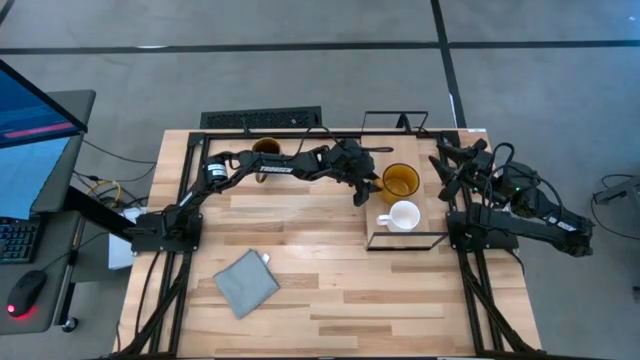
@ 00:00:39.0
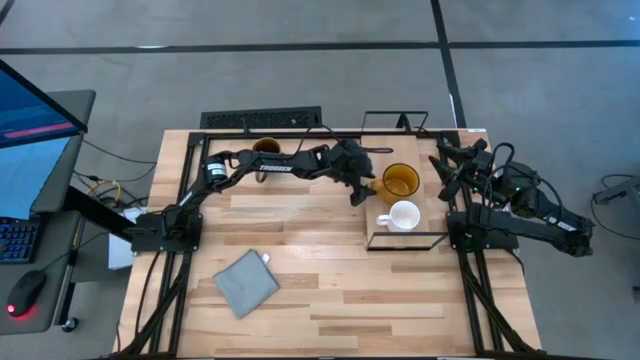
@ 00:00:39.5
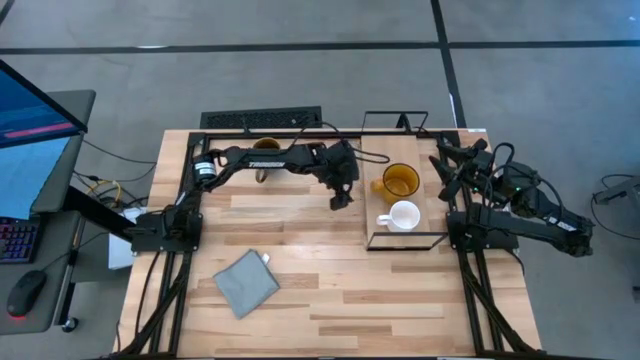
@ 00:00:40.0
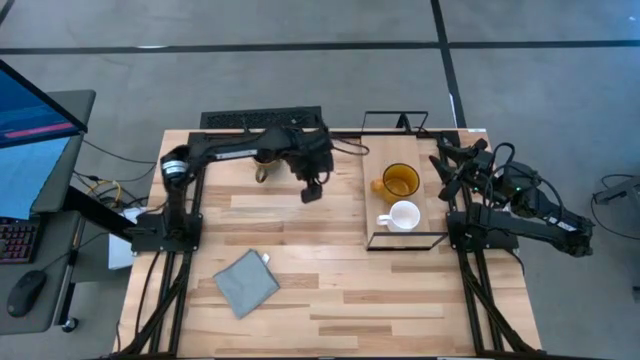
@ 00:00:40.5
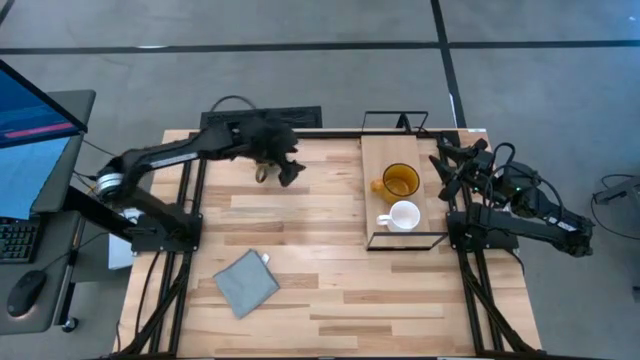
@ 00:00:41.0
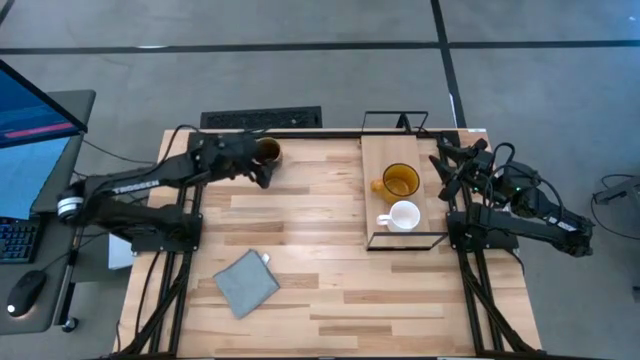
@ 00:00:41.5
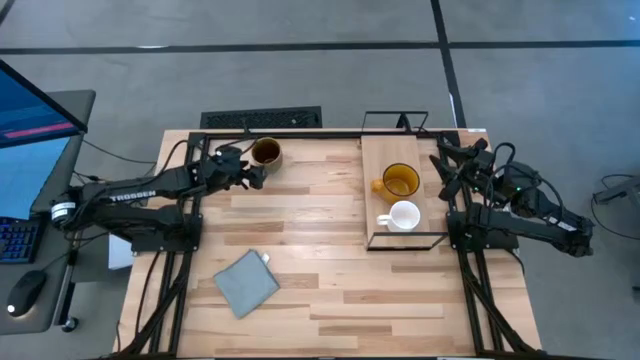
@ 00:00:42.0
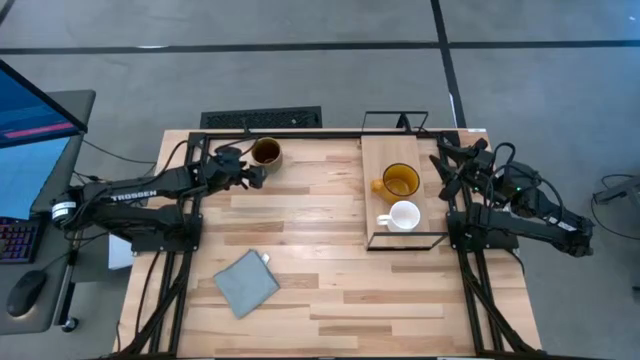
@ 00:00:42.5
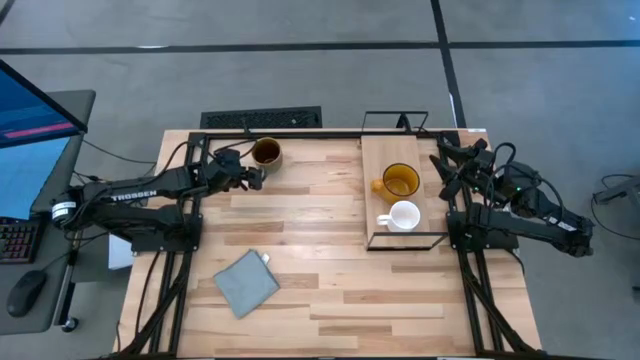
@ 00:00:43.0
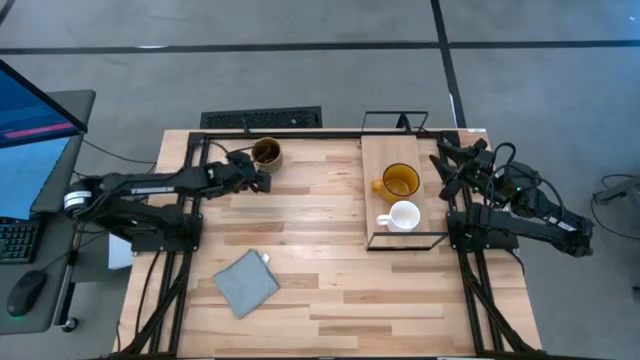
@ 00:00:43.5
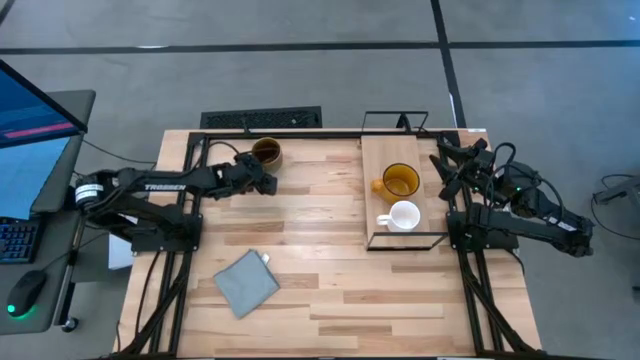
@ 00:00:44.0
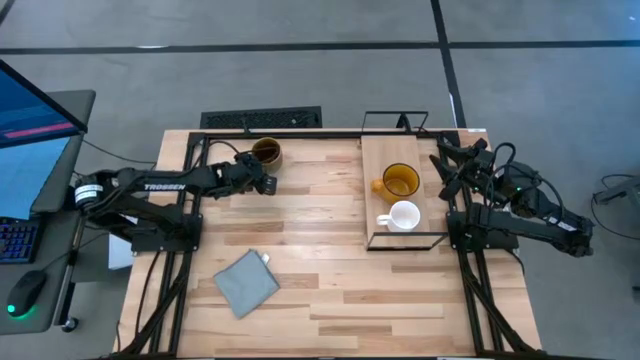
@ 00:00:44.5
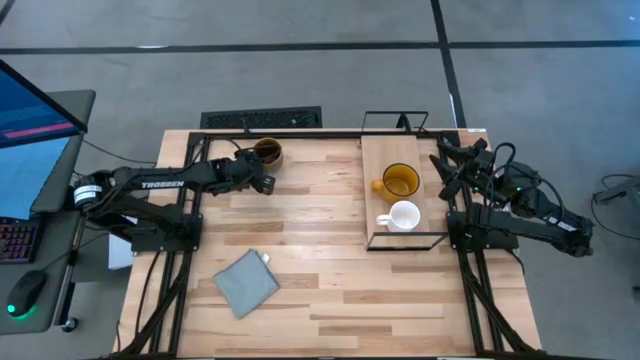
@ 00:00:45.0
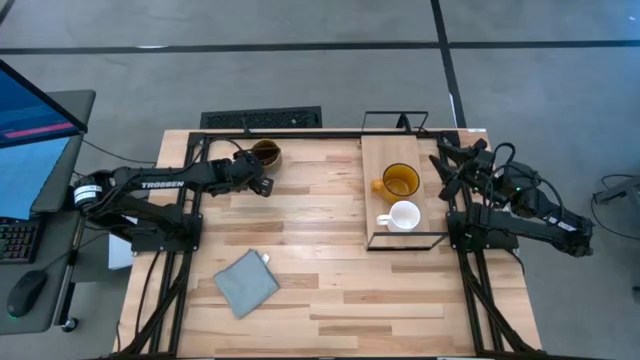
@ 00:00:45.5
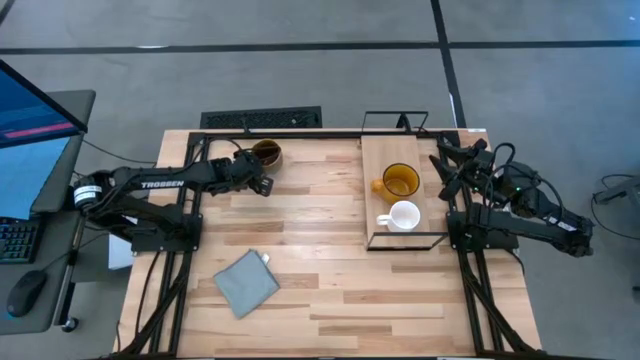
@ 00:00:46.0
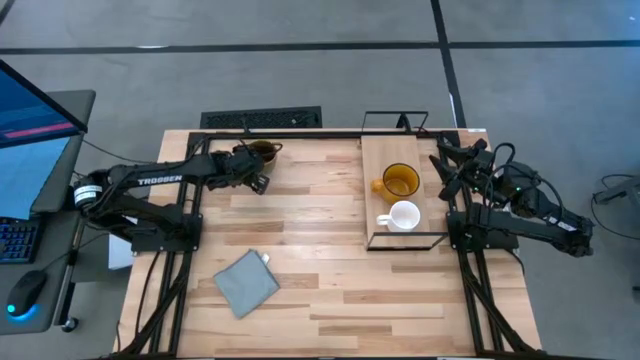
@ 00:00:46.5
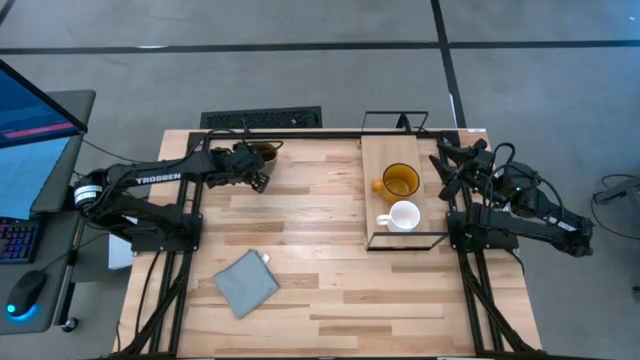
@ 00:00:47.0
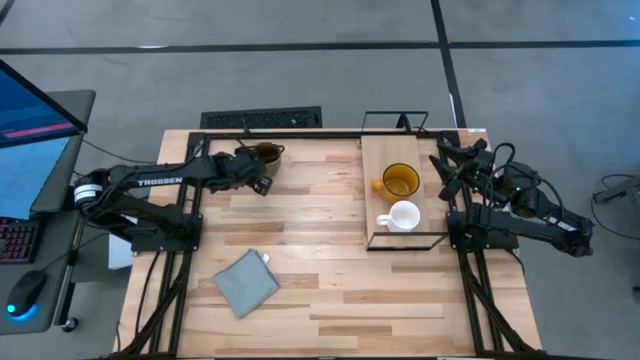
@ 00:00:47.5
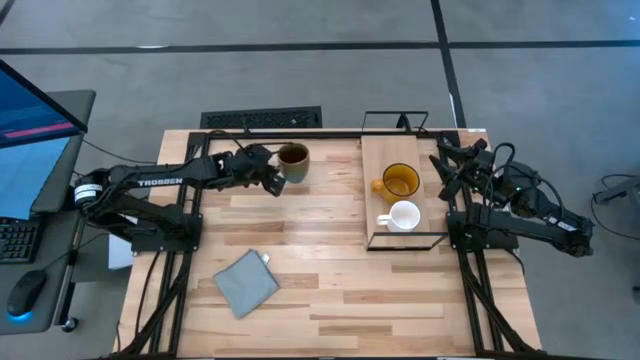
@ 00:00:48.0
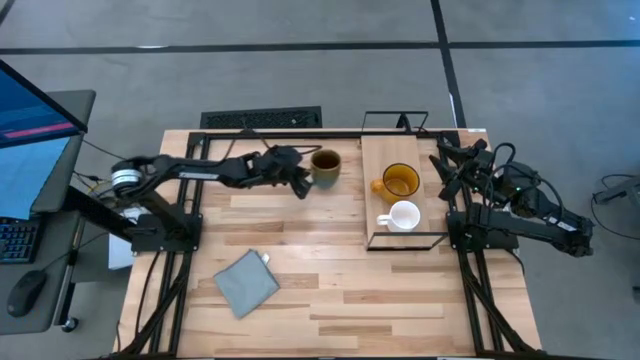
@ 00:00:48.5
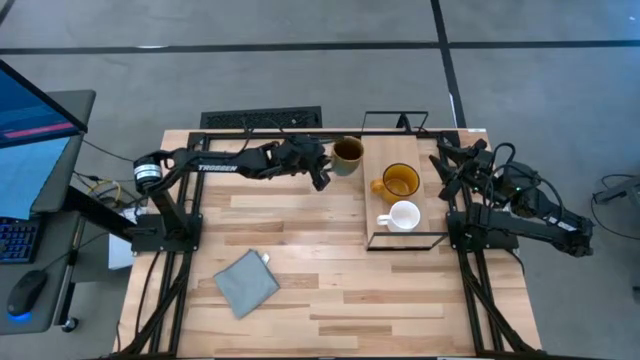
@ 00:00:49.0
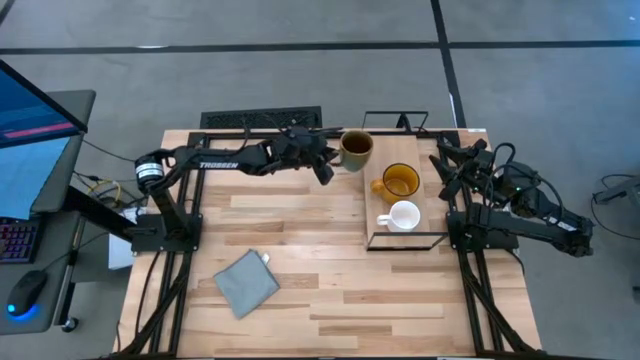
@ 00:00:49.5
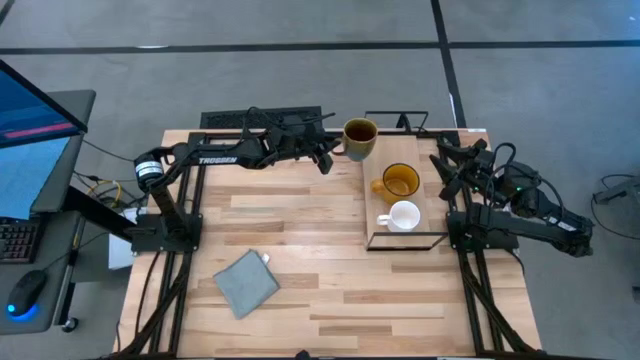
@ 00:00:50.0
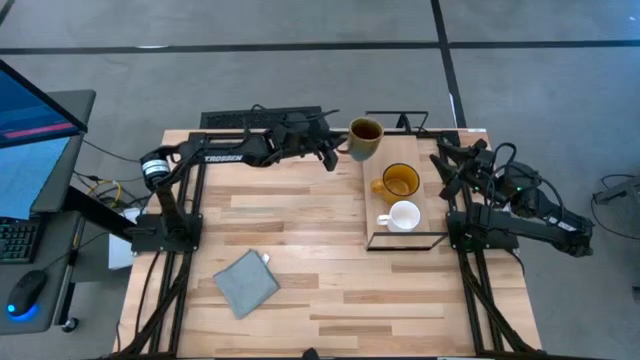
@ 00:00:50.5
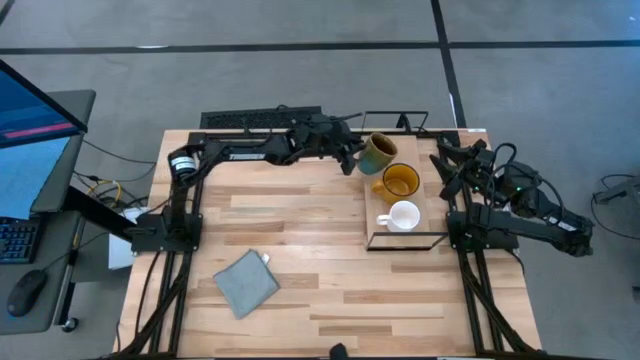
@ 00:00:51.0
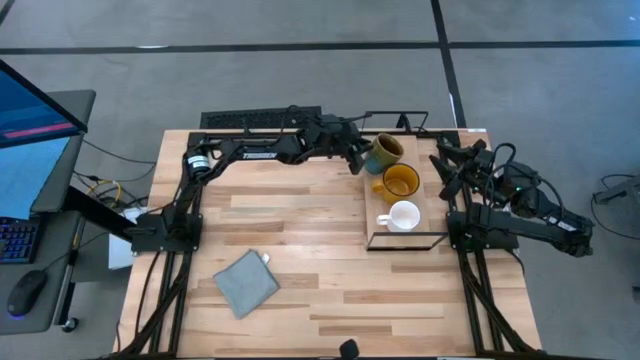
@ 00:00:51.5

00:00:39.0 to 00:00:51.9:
Task: Stack small to large cups/mugs on shelf
Put the green mug on the shelf
